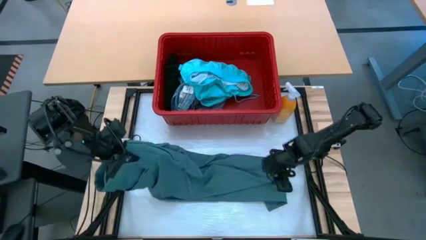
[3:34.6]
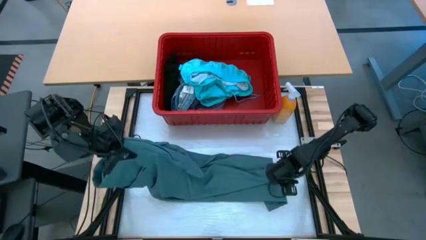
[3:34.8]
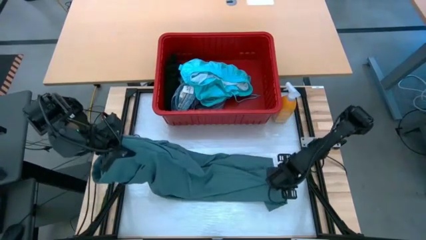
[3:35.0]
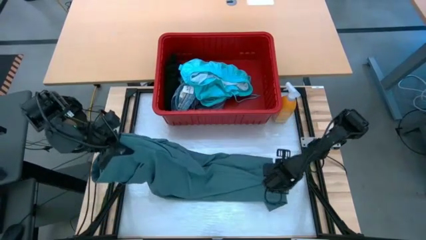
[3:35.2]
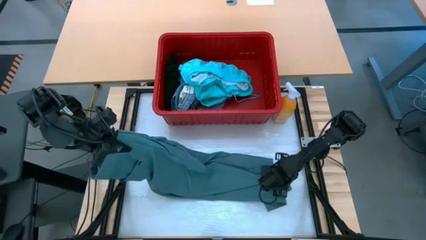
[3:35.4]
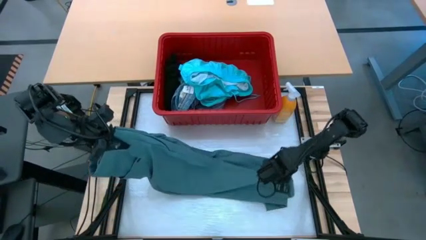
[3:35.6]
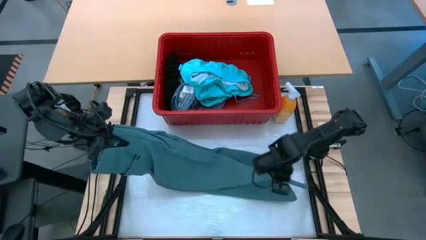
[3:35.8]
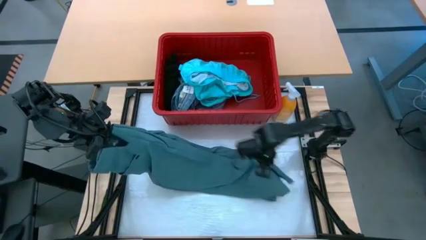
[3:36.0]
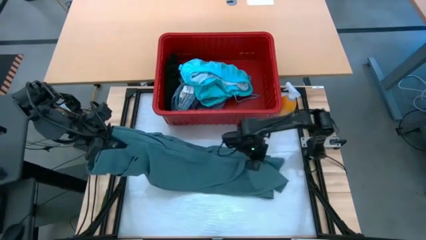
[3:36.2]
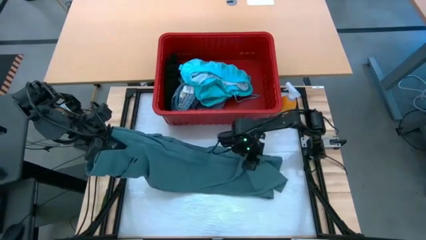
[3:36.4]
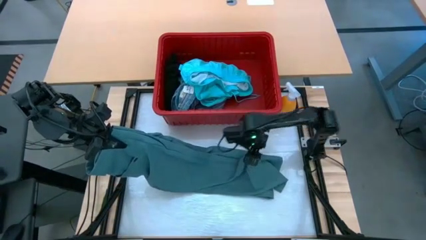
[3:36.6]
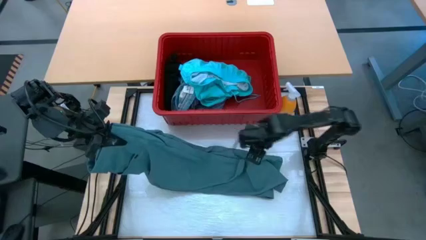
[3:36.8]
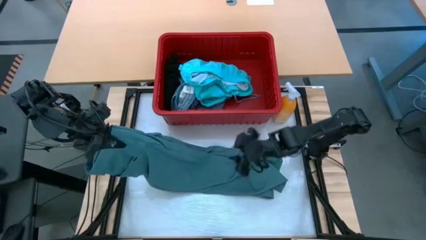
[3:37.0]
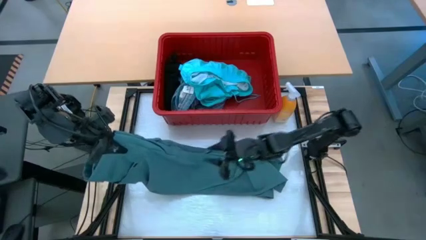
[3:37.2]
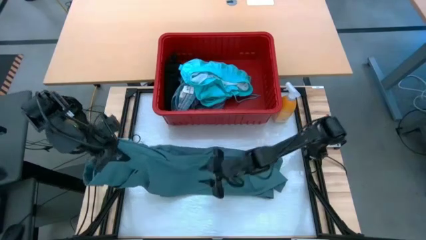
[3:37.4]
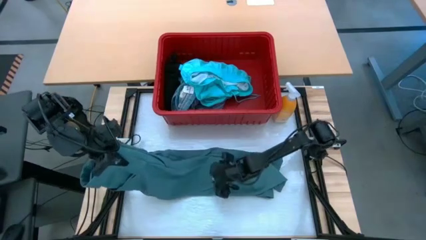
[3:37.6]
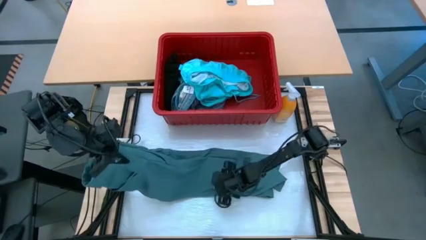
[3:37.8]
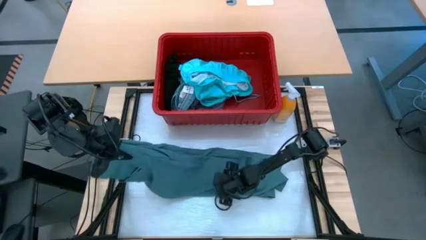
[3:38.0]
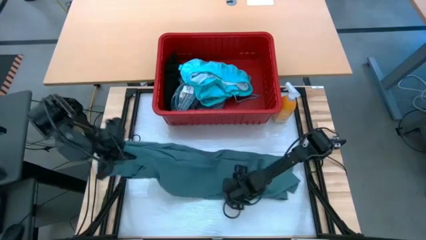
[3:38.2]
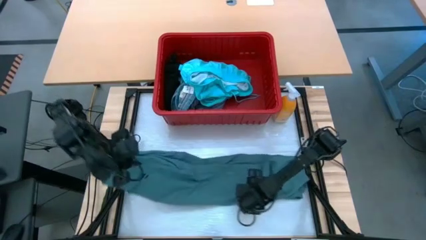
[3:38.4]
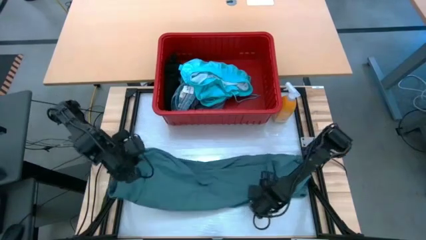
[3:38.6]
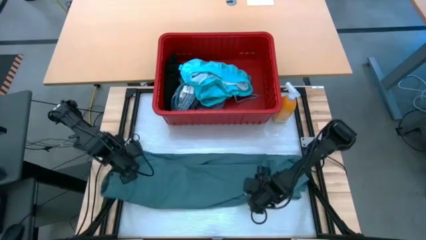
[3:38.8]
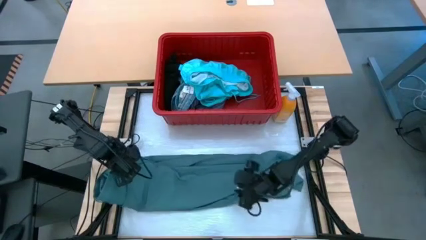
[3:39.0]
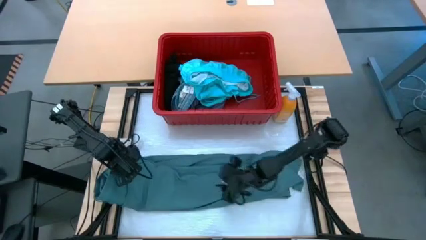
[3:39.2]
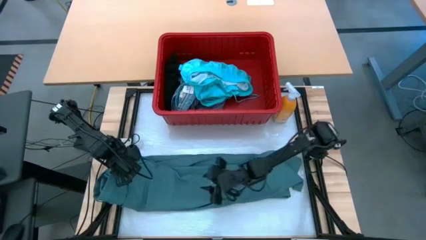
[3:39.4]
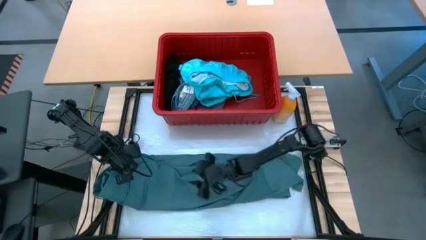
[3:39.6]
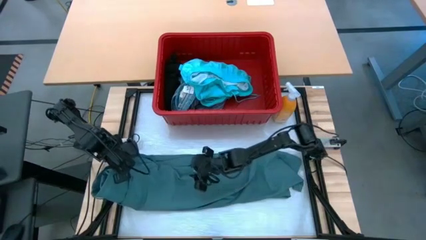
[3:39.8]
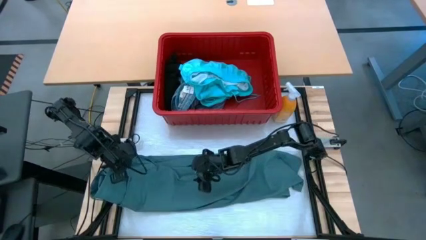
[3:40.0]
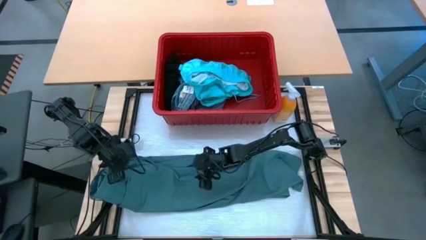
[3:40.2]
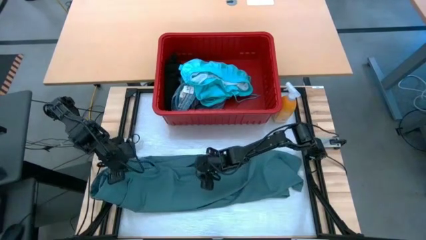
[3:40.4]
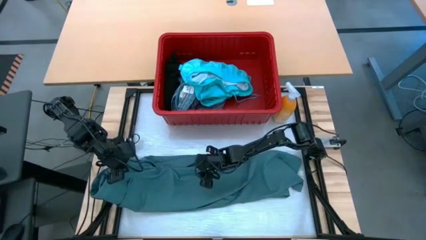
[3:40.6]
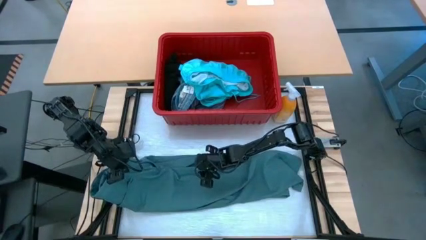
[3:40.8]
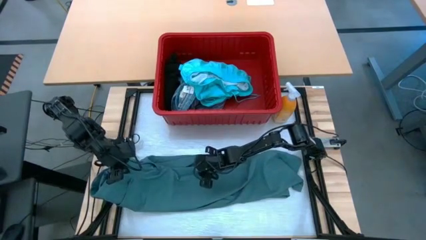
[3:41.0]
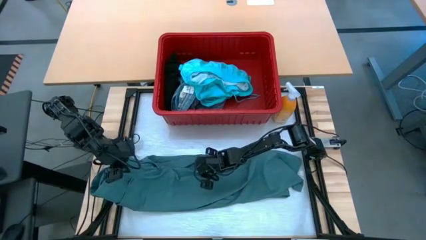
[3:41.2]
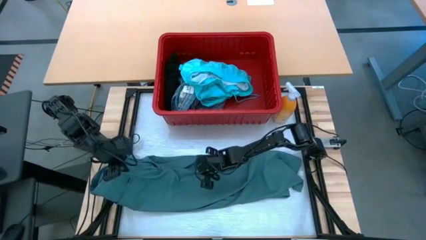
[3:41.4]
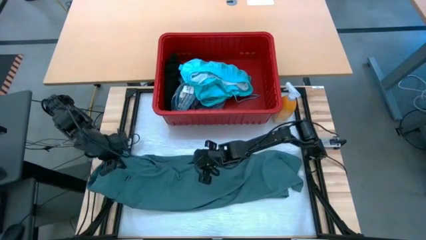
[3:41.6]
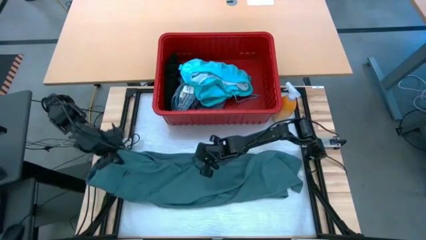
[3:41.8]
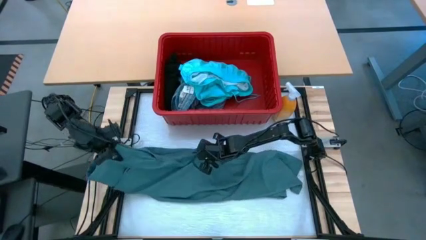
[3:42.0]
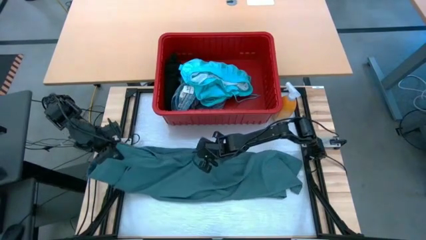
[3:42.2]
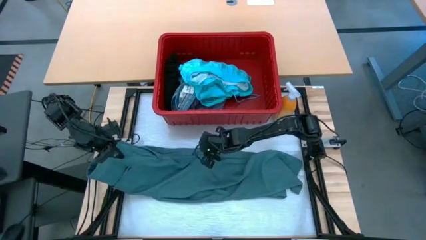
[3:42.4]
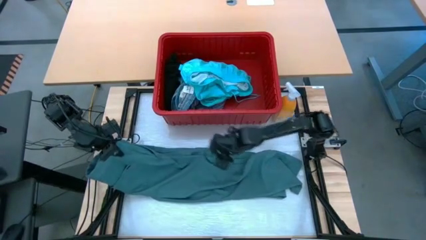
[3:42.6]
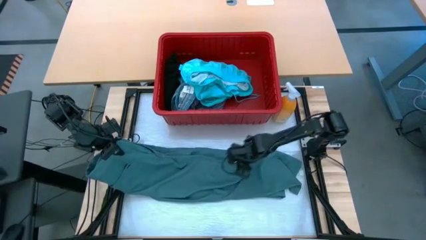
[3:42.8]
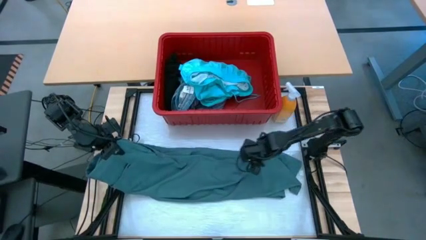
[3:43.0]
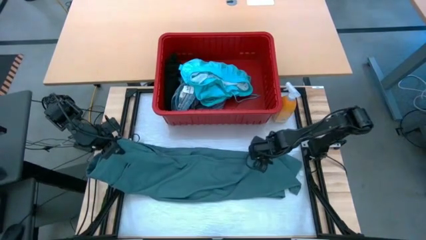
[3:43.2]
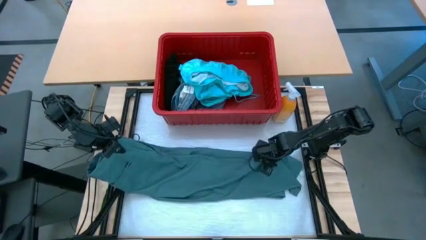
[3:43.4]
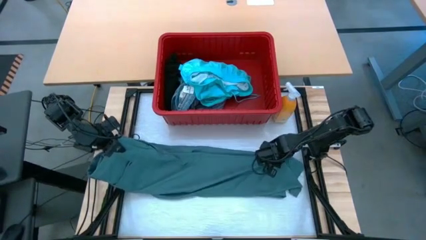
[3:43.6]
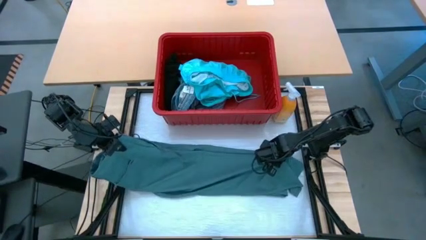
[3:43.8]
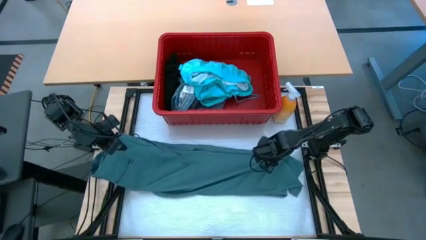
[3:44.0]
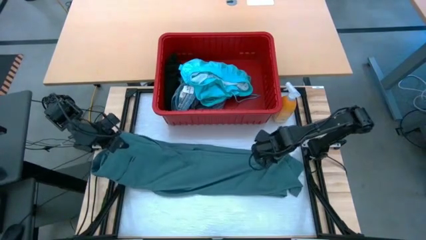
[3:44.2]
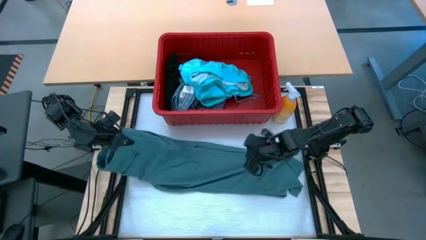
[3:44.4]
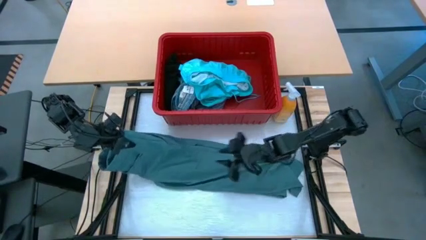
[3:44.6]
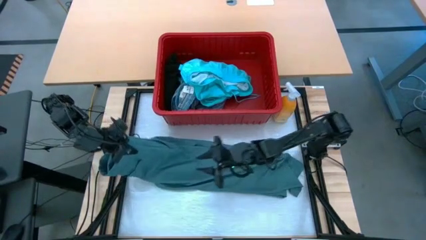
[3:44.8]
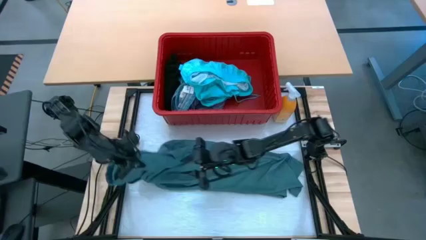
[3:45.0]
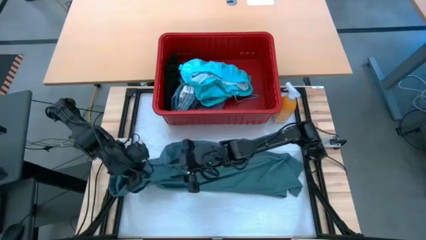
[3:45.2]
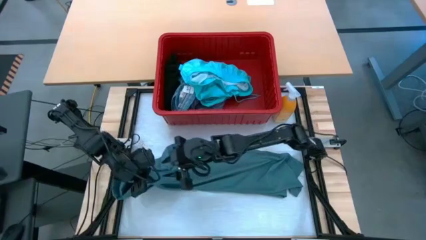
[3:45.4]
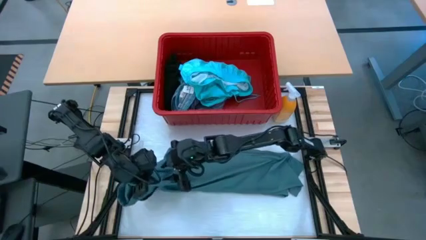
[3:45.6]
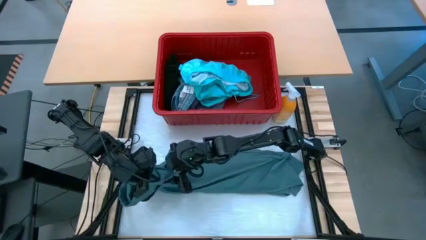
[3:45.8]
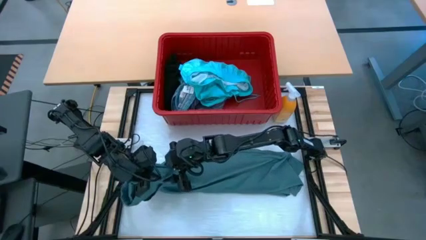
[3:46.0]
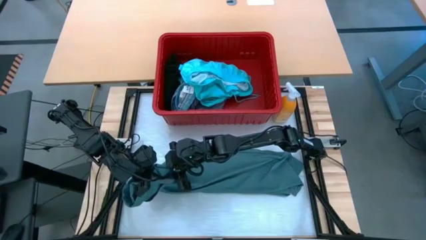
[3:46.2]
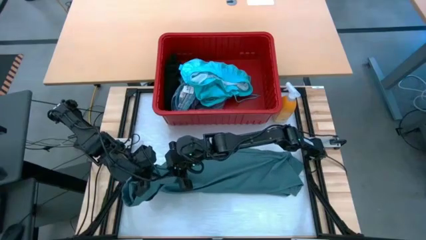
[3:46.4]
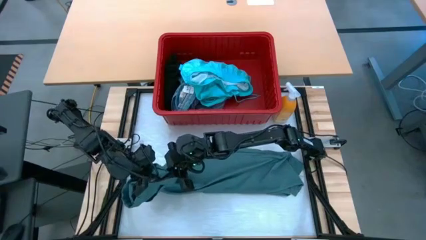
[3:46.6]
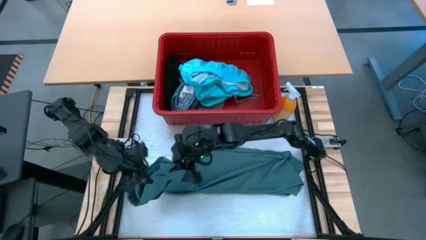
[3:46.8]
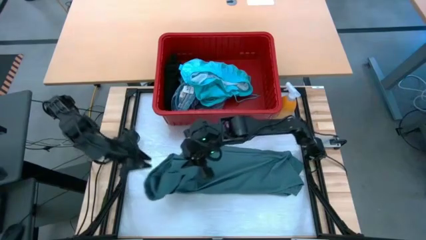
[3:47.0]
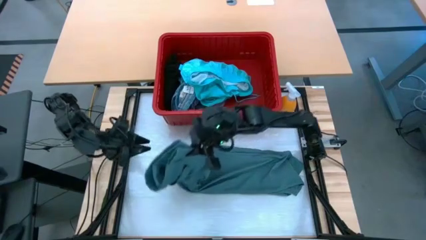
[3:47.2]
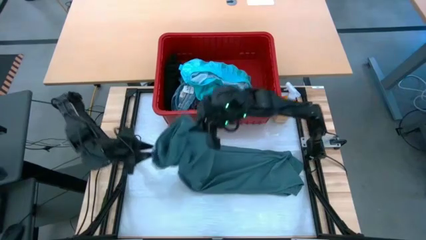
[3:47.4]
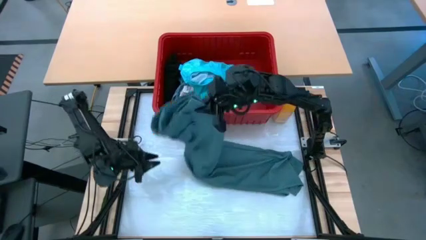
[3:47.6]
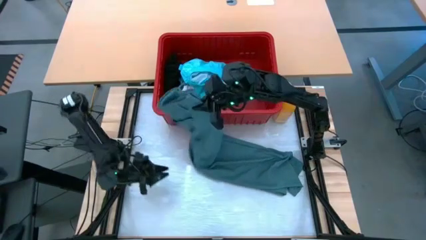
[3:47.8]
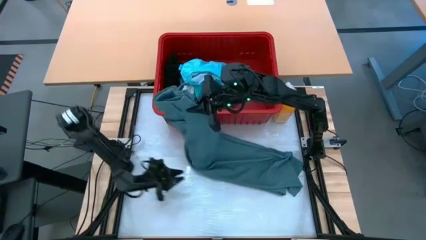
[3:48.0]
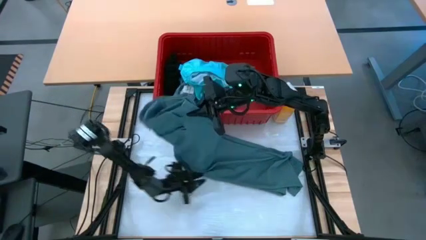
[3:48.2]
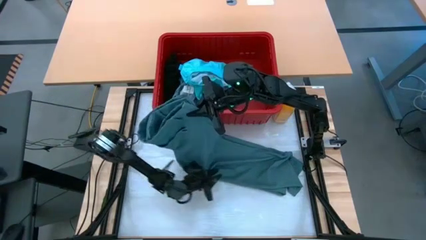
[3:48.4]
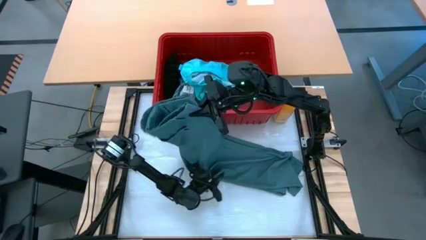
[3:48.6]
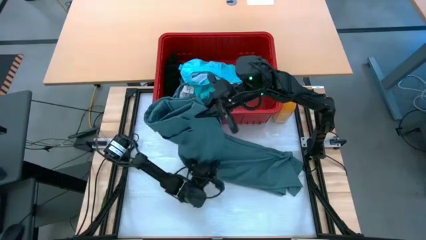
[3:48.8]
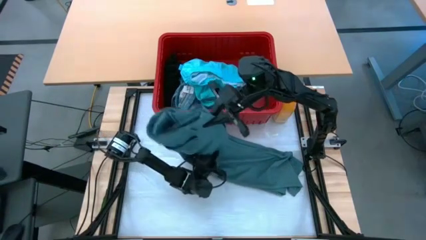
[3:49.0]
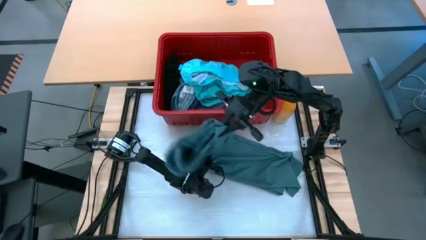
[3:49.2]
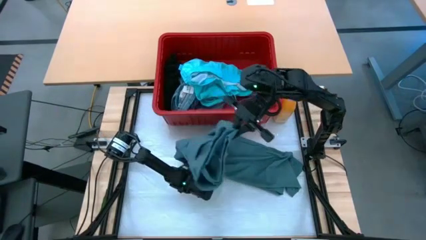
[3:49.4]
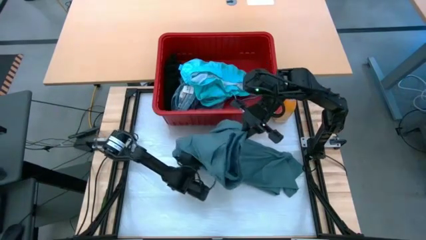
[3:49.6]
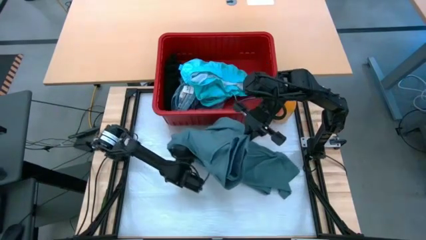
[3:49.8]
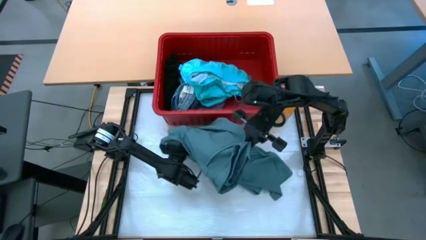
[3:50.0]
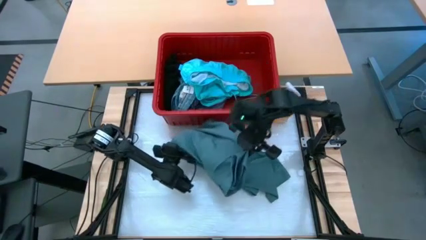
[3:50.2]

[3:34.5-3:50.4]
Task: Fold Laundry from Bin
Fold the light blue pants
